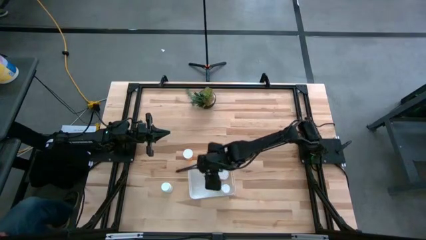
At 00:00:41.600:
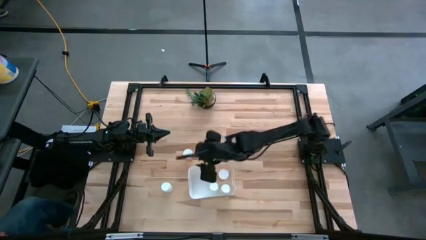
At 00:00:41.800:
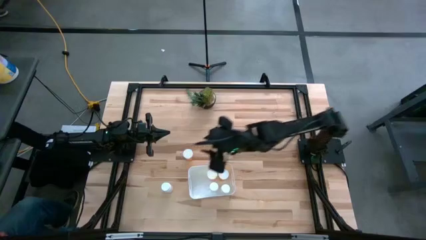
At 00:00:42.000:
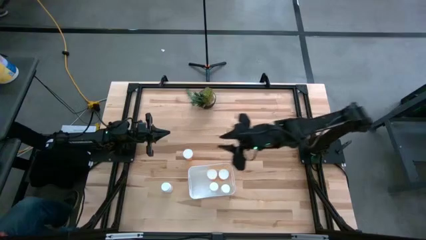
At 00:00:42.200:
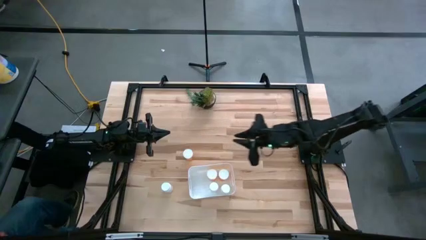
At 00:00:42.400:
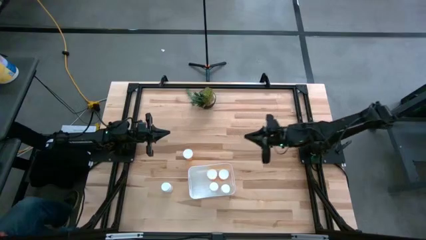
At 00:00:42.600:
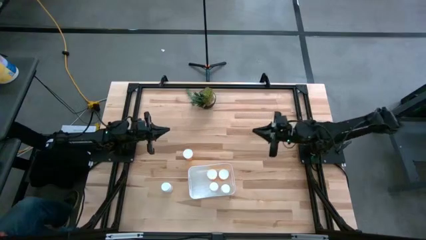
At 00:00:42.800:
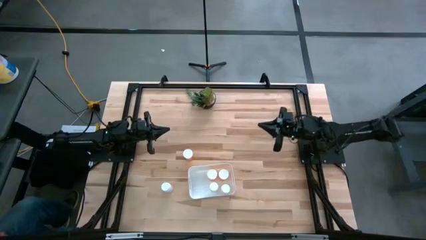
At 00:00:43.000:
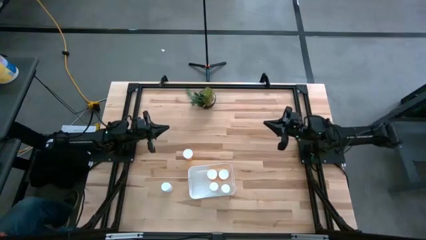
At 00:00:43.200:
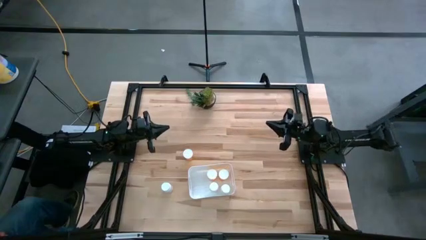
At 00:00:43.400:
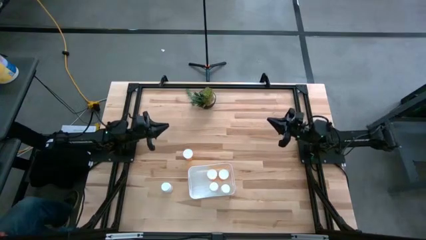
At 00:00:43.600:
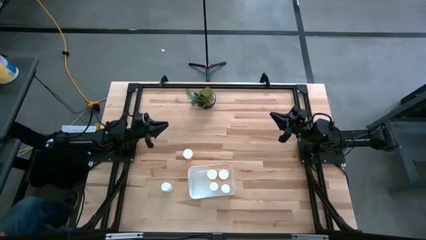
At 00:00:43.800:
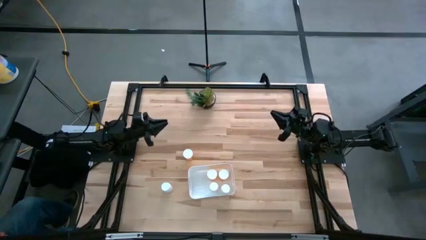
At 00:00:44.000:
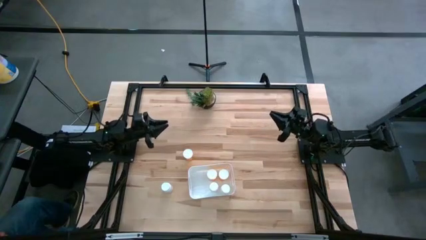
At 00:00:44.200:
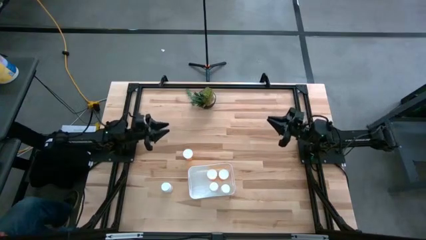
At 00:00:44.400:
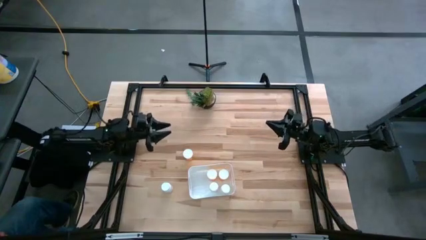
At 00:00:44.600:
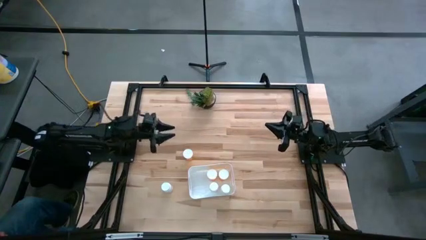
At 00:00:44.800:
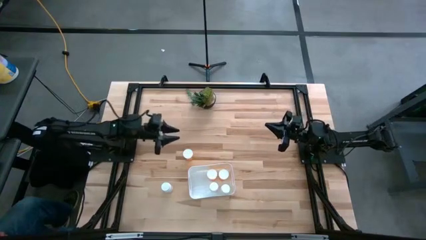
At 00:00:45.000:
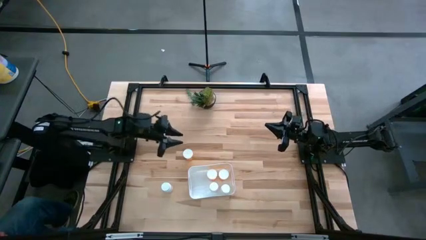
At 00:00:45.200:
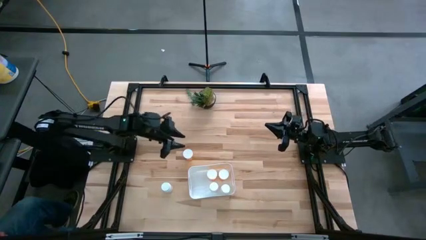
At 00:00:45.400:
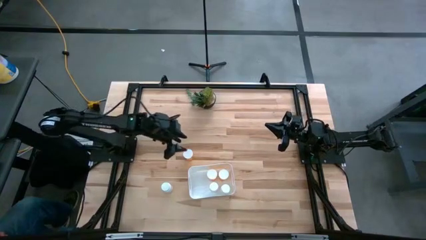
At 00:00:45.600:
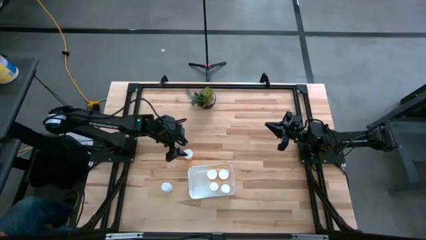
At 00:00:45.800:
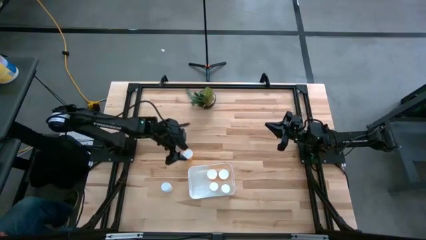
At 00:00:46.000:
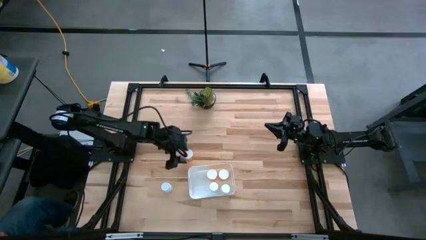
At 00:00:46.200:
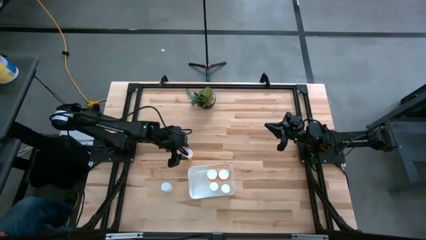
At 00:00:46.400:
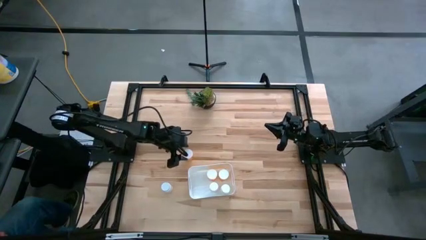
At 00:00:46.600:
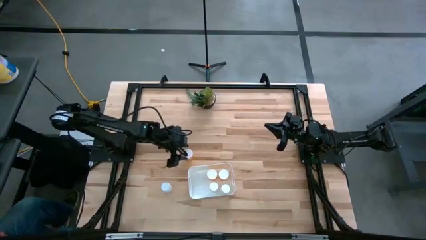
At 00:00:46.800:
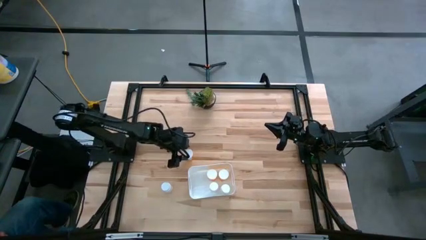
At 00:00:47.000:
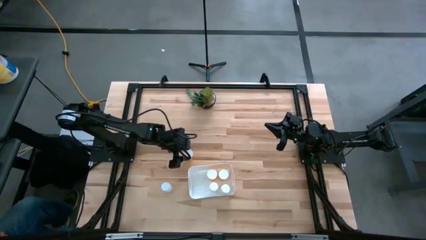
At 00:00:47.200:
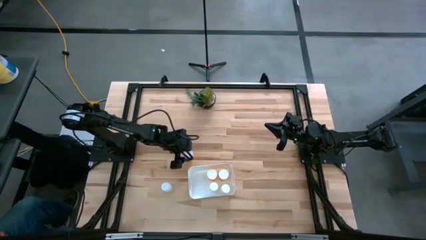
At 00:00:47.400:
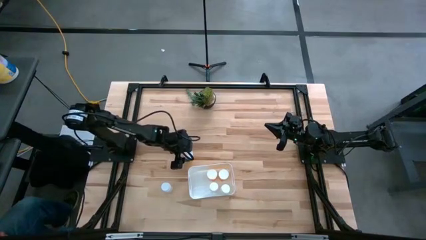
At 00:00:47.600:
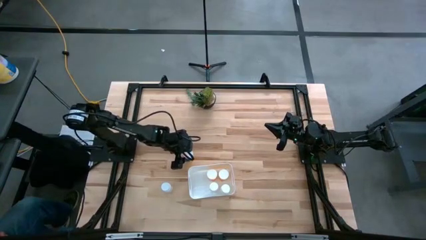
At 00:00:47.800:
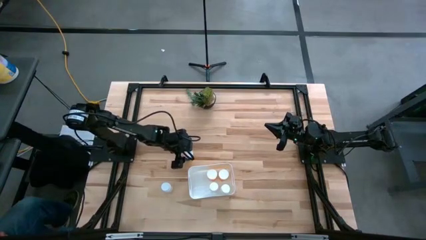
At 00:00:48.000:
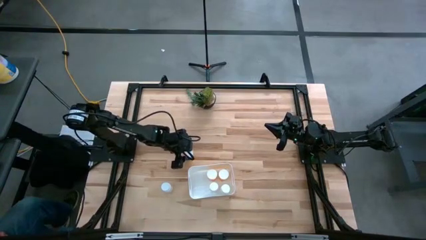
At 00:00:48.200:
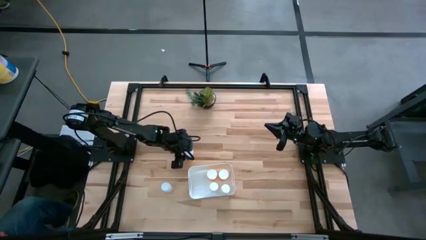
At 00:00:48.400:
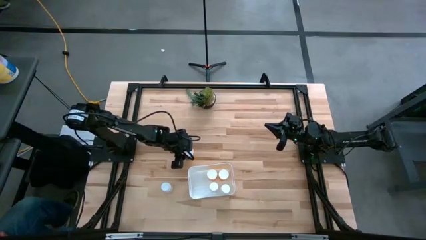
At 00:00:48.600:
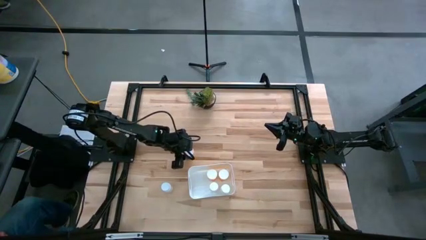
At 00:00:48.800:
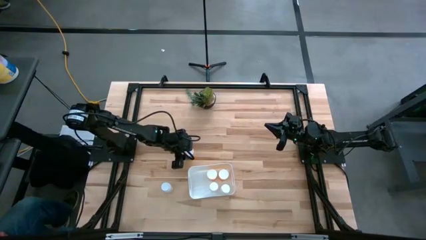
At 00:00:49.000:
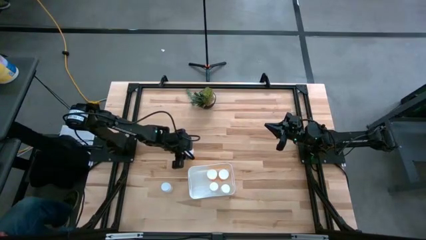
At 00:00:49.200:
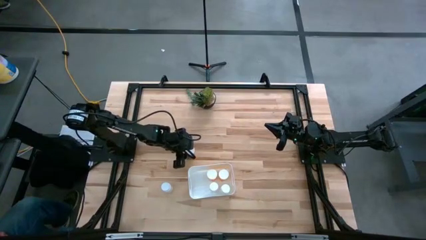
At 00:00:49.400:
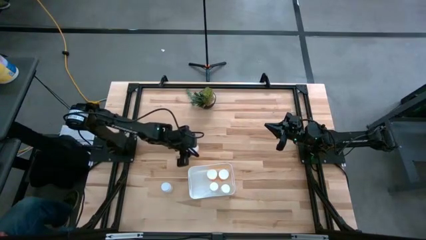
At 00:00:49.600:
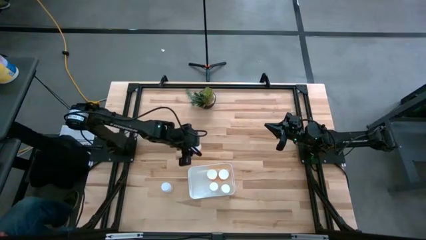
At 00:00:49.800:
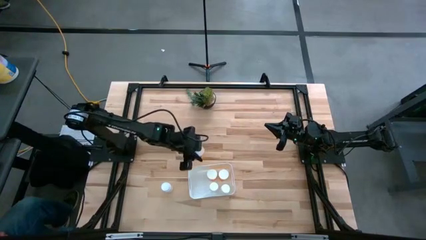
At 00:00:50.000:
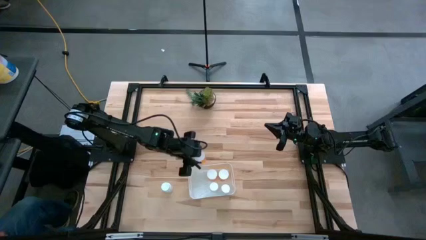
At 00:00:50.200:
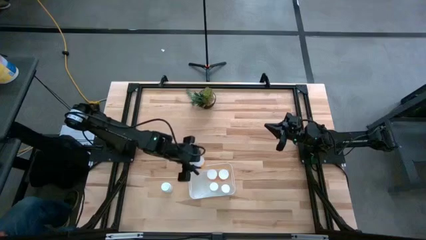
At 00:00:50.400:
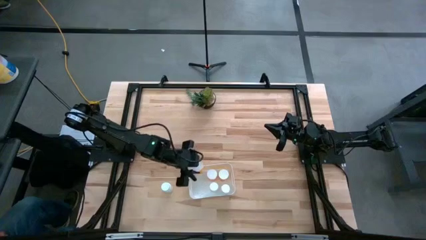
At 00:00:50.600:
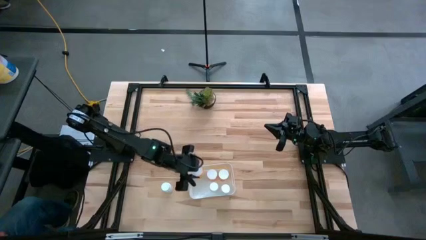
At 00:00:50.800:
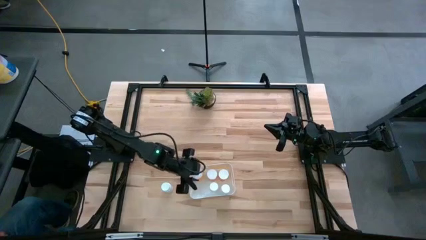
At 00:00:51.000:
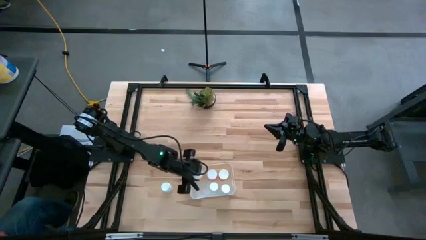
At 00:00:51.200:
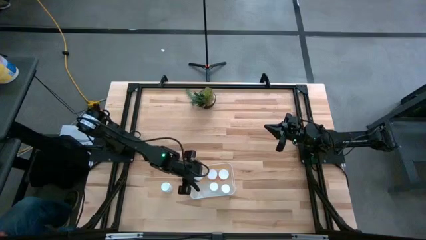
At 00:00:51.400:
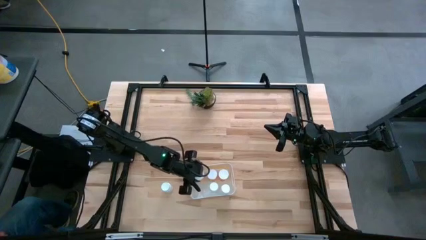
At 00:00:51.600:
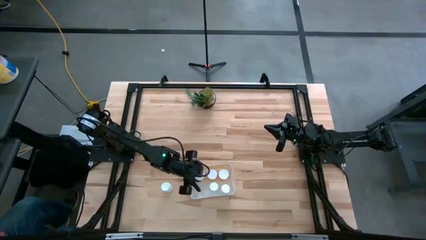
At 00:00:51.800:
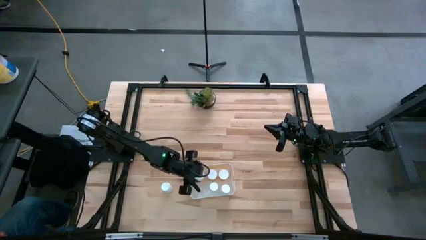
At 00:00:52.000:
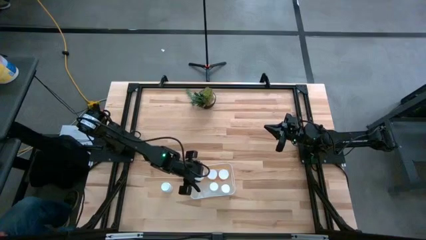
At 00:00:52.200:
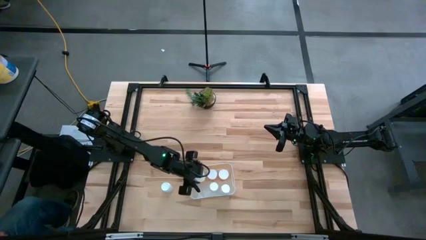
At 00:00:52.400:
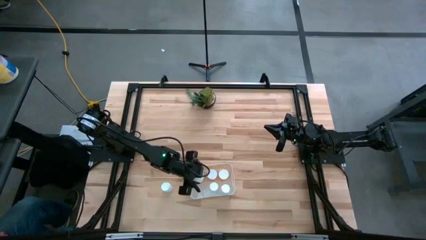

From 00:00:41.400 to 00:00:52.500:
Task: Pick and place pill bottles into a basket
Put the orange pill bottle into the white bin

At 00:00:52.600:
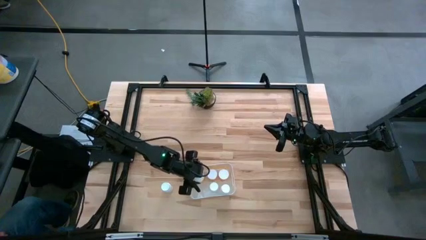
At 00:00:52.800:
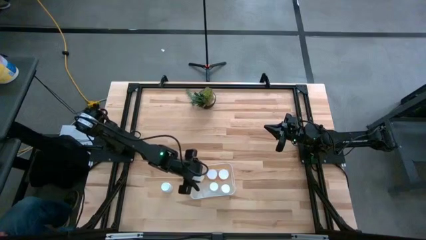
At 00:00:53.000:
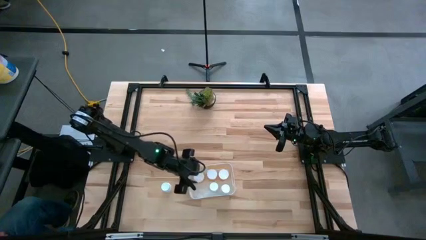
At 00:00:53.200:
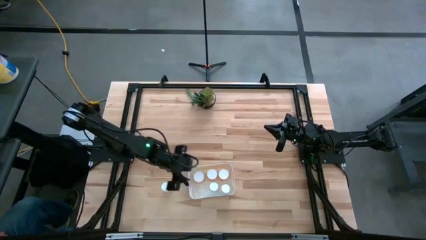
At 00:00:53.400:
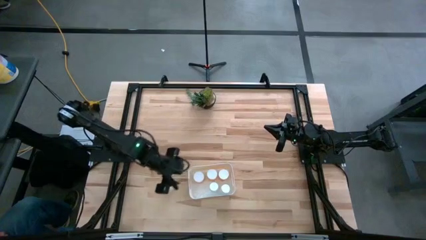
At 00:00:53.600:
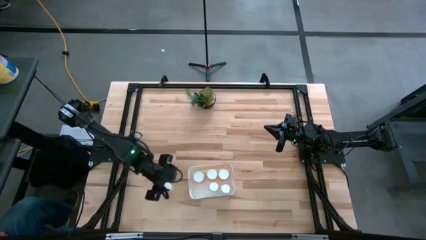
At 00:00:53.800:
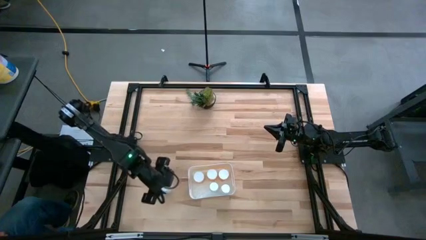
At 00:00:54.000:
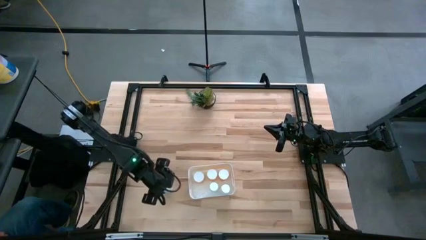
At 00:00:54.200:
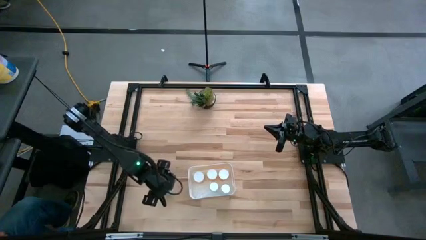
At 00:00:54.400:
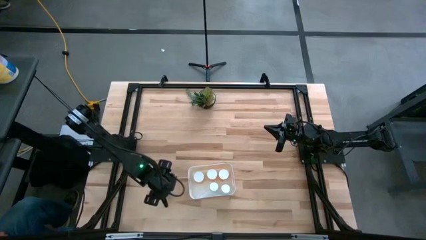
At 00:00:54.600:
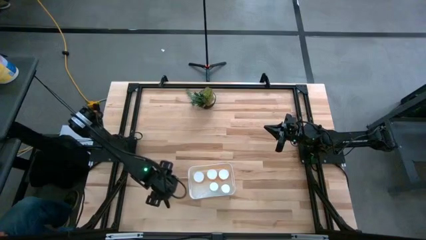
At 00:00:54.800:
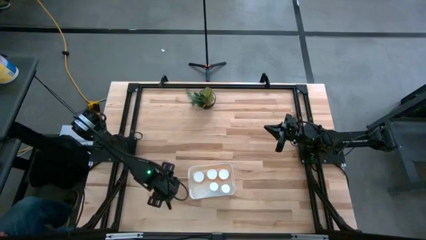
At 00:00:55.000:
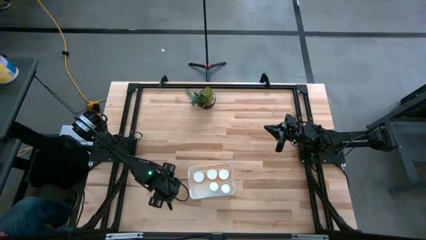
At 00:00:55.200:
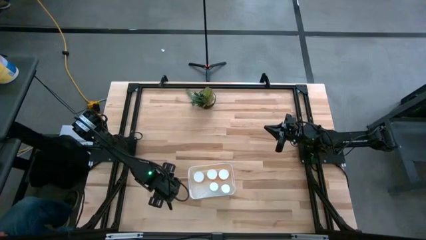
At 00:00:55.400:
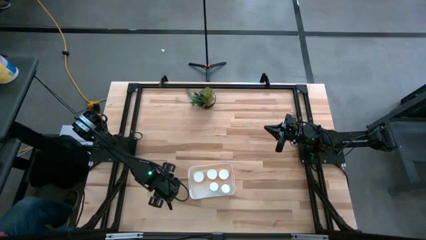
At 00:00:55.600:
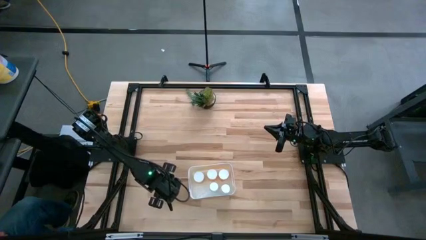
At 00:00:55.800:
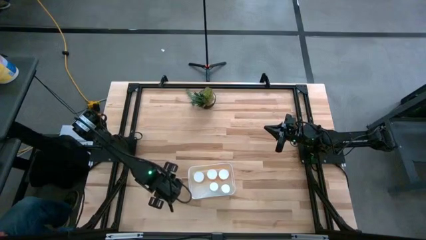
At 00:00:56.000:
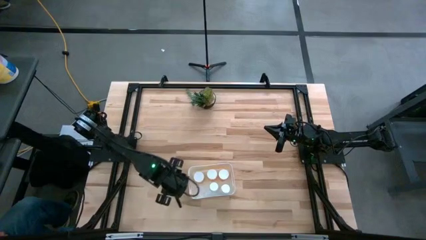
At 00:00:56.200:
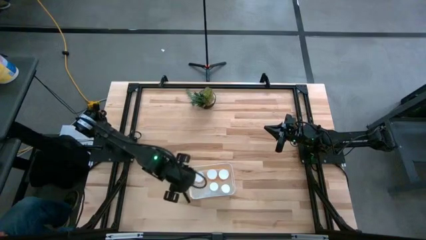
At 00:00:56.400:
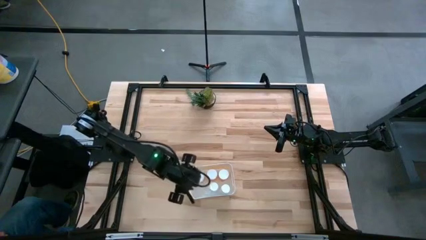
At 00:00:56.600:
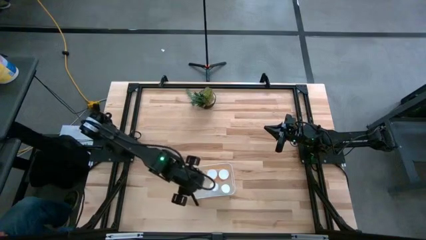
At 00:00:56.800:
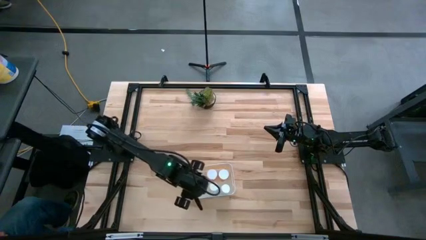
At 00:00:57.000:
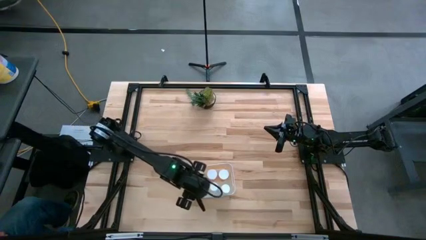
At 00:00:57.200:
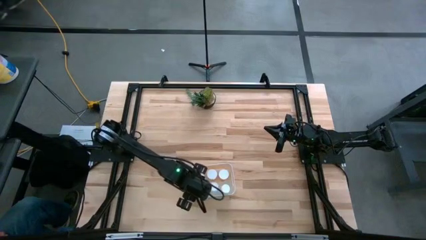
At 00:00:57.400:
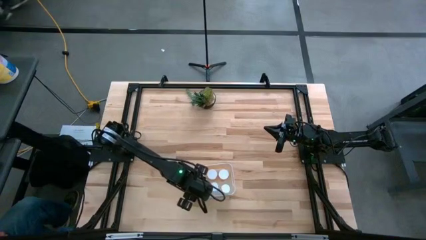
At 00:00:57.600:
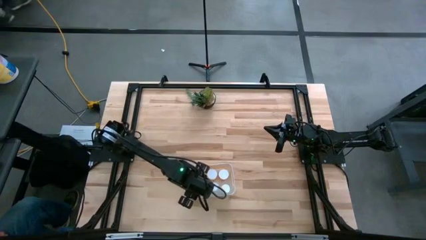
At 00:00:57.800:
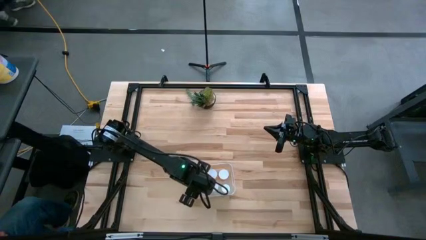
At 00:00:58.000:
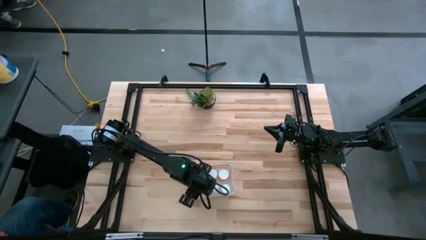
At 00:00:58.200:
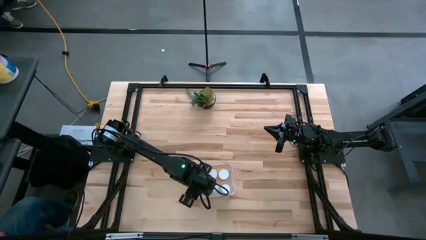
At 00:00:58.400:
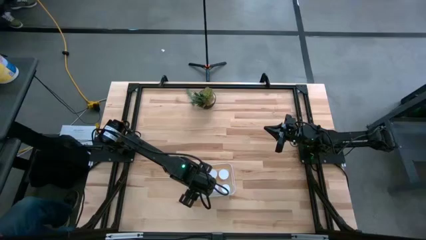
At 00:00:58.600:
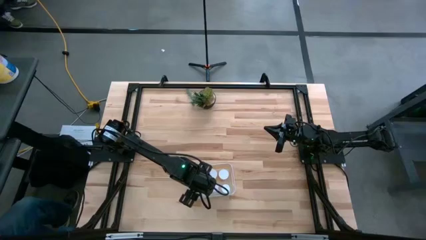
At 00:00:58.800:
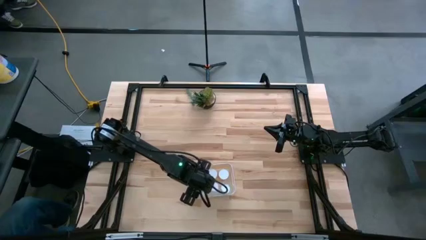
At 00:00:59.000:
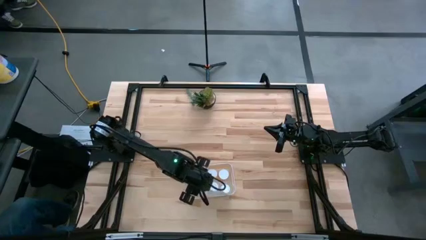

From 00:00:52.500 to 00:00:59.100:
Put the white pill bottle into the white bin
